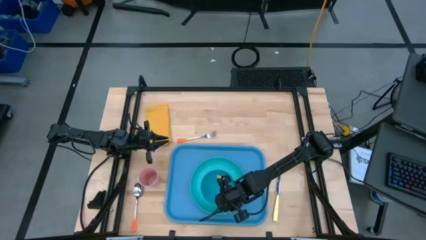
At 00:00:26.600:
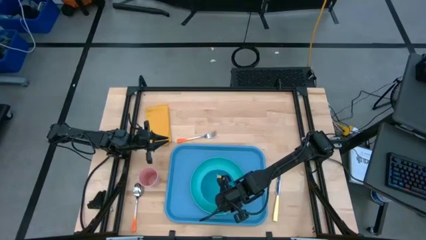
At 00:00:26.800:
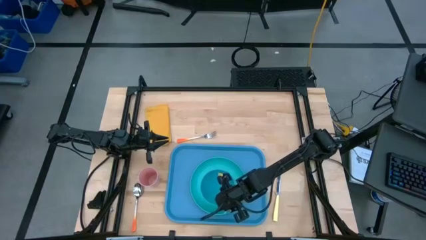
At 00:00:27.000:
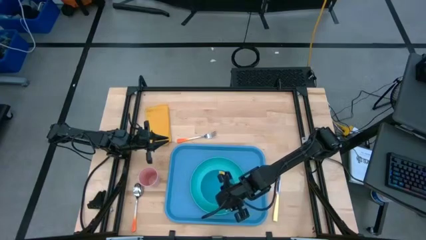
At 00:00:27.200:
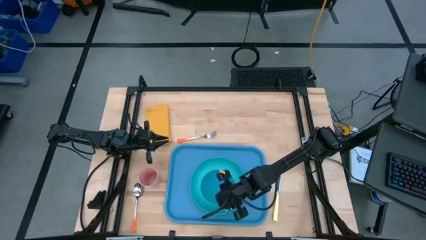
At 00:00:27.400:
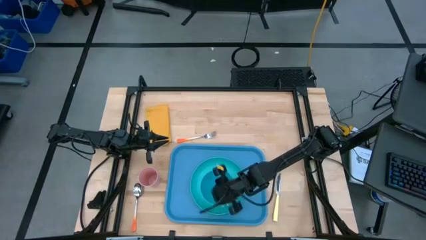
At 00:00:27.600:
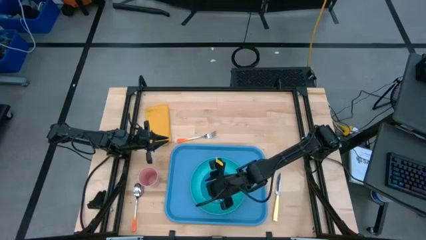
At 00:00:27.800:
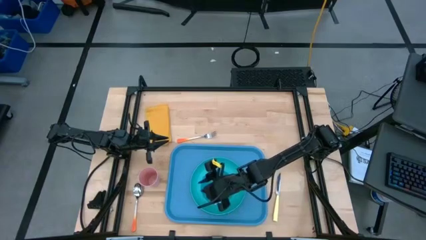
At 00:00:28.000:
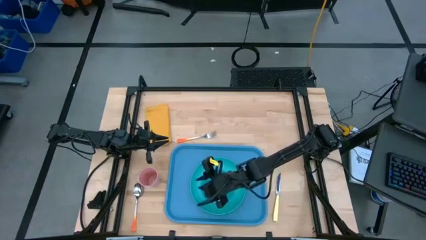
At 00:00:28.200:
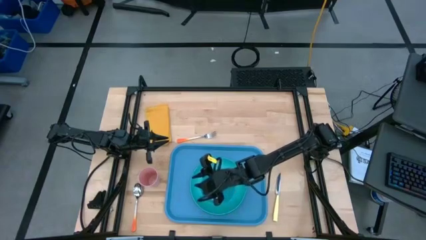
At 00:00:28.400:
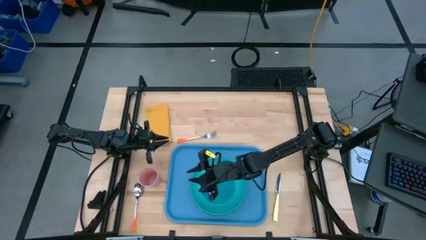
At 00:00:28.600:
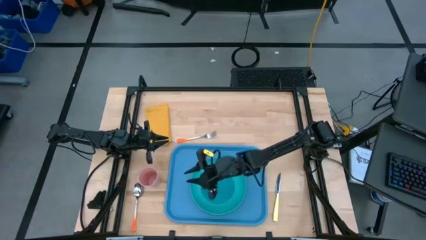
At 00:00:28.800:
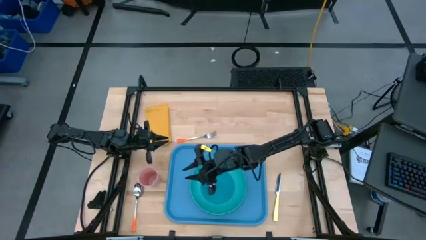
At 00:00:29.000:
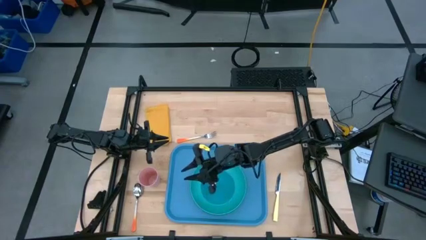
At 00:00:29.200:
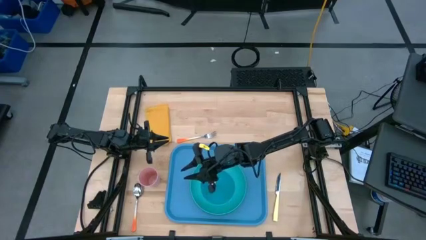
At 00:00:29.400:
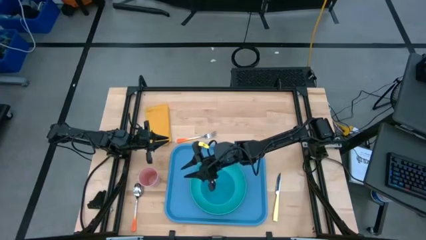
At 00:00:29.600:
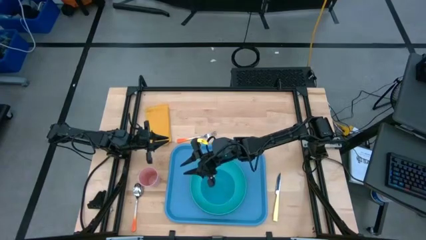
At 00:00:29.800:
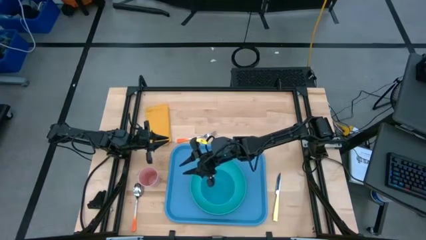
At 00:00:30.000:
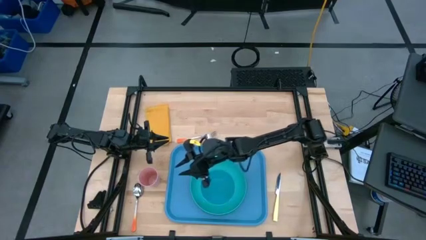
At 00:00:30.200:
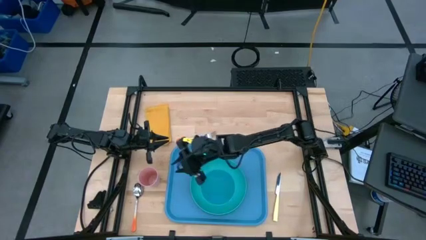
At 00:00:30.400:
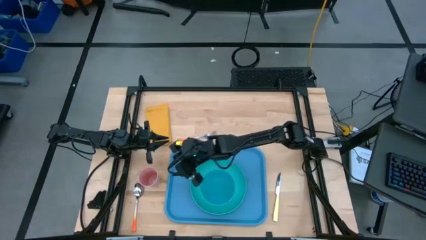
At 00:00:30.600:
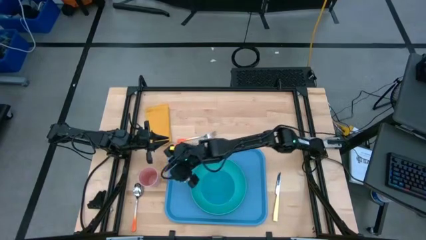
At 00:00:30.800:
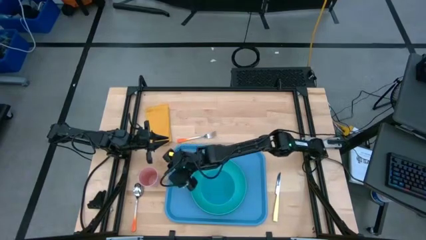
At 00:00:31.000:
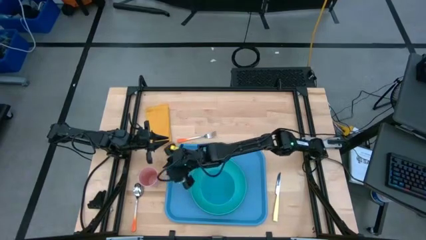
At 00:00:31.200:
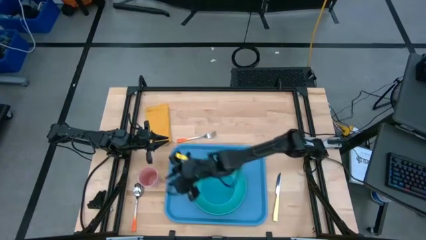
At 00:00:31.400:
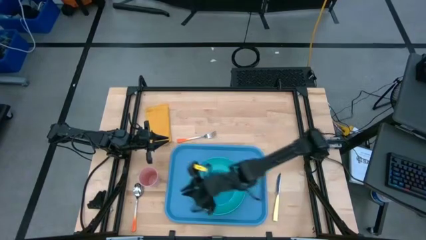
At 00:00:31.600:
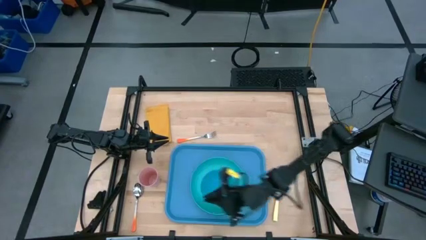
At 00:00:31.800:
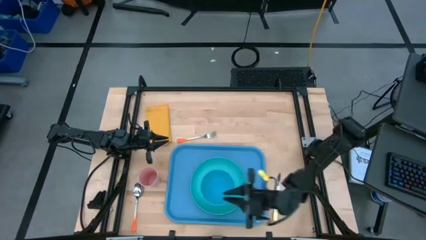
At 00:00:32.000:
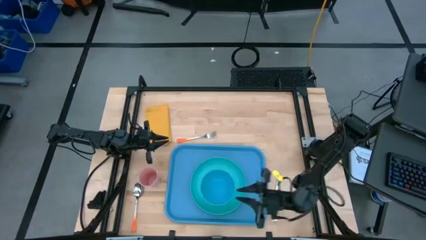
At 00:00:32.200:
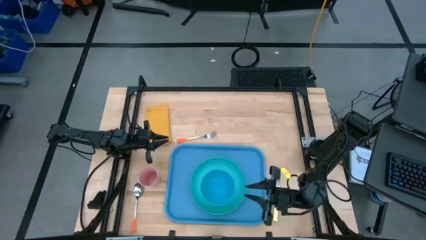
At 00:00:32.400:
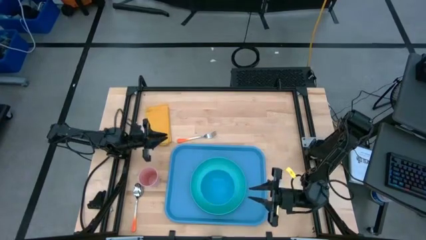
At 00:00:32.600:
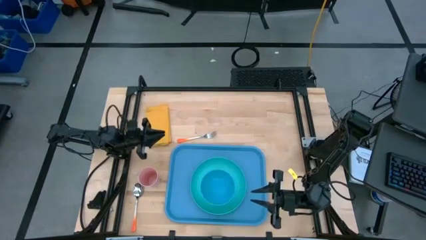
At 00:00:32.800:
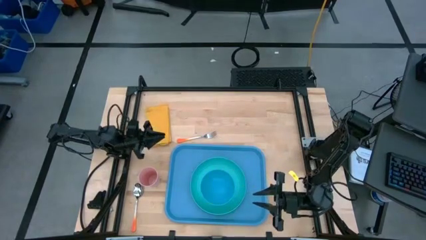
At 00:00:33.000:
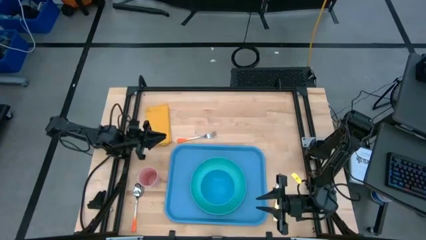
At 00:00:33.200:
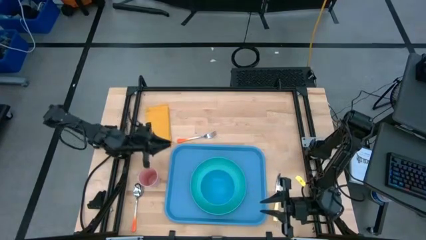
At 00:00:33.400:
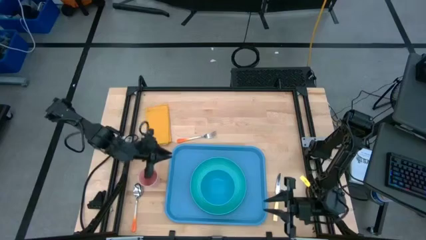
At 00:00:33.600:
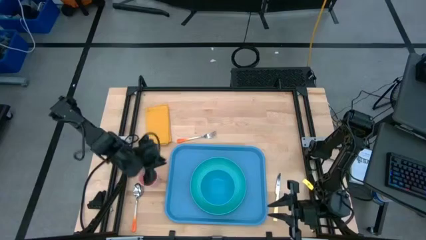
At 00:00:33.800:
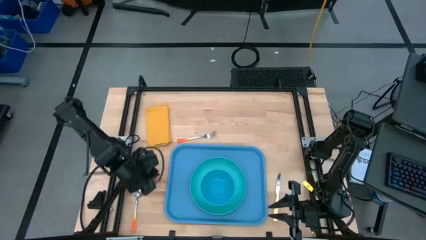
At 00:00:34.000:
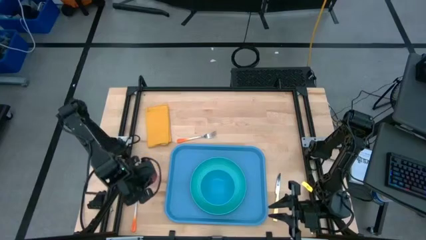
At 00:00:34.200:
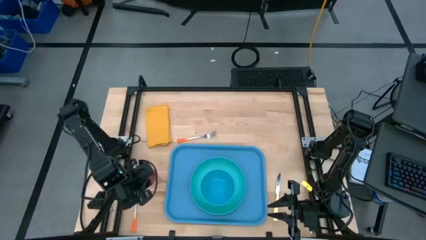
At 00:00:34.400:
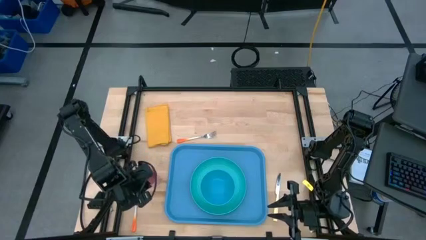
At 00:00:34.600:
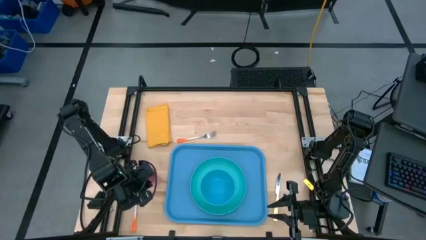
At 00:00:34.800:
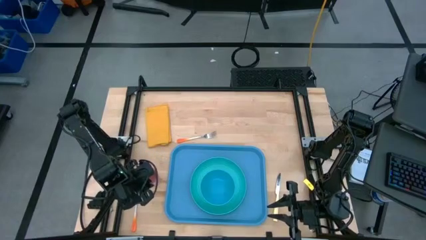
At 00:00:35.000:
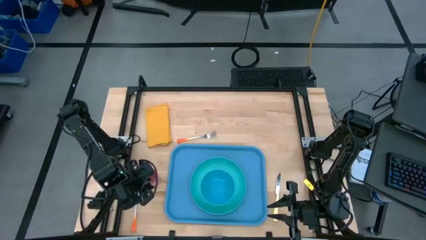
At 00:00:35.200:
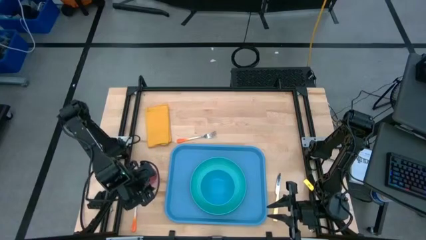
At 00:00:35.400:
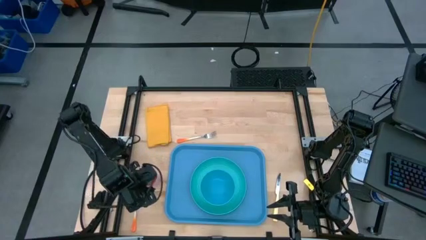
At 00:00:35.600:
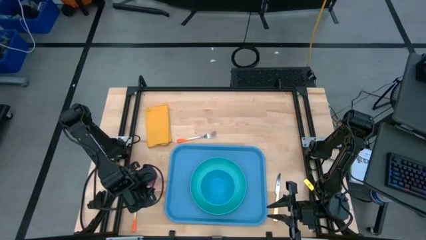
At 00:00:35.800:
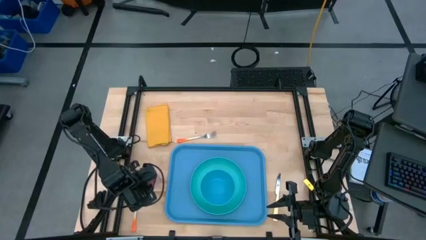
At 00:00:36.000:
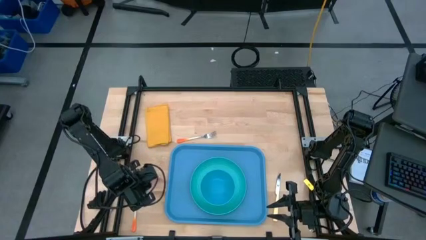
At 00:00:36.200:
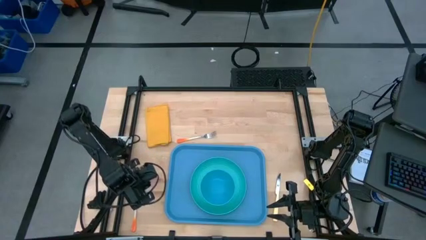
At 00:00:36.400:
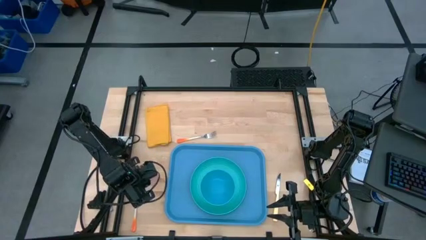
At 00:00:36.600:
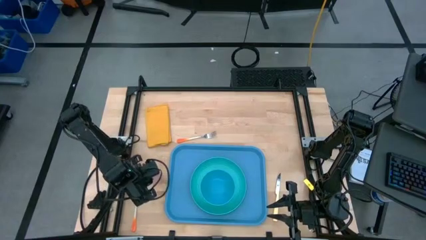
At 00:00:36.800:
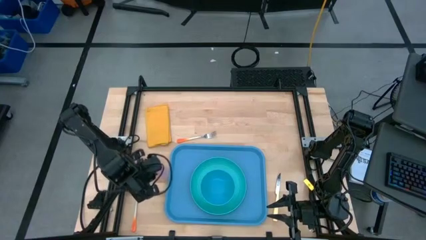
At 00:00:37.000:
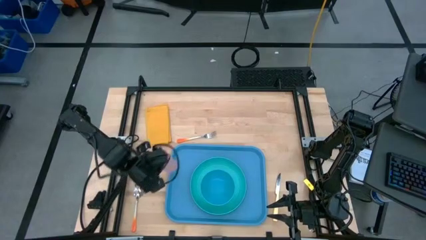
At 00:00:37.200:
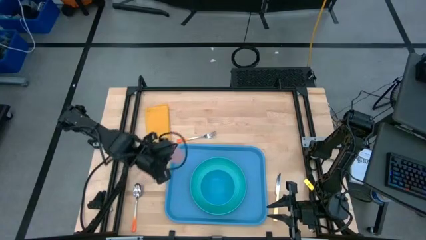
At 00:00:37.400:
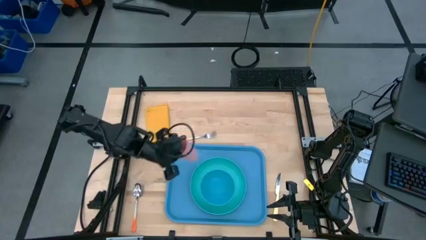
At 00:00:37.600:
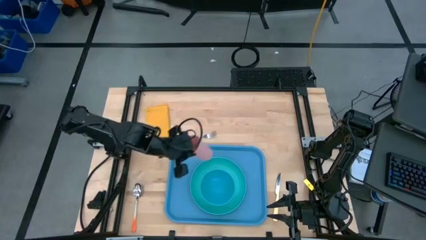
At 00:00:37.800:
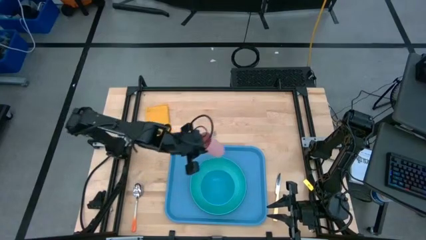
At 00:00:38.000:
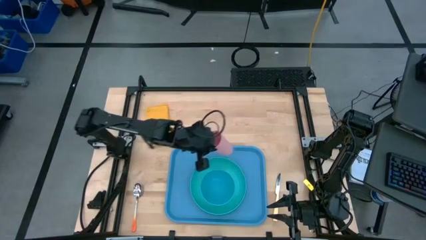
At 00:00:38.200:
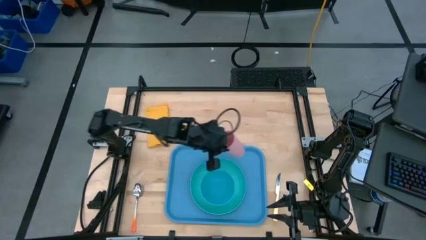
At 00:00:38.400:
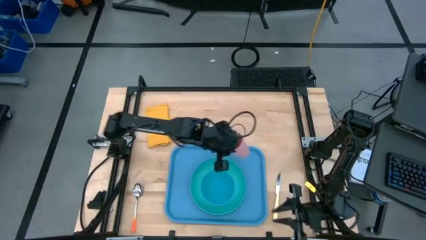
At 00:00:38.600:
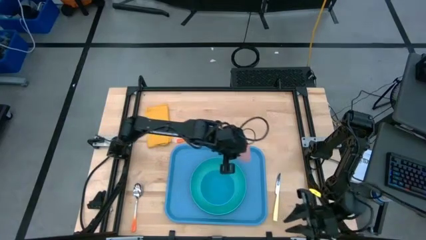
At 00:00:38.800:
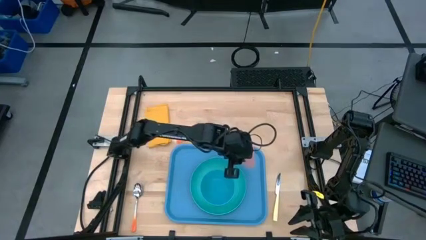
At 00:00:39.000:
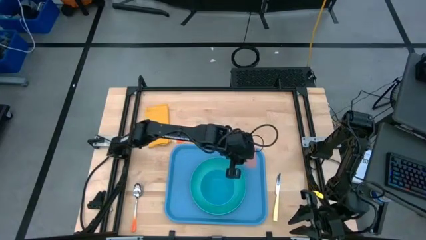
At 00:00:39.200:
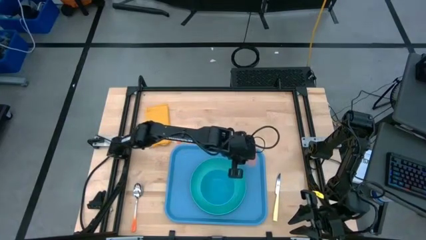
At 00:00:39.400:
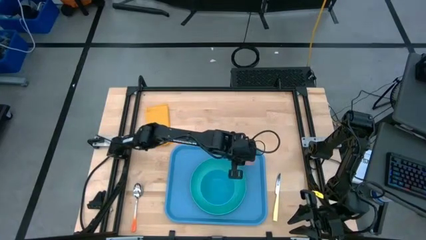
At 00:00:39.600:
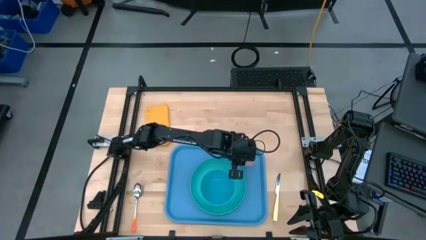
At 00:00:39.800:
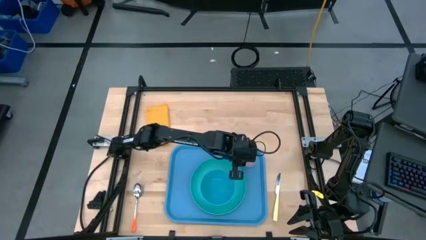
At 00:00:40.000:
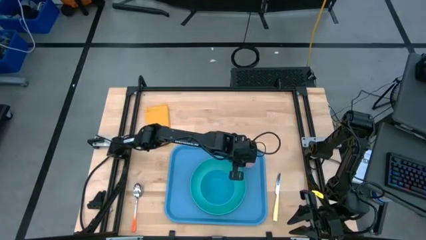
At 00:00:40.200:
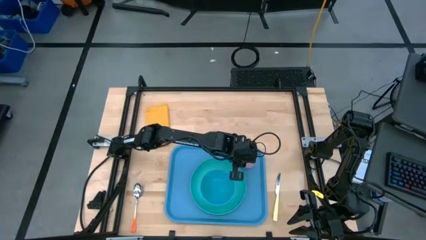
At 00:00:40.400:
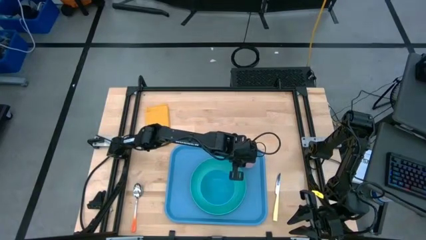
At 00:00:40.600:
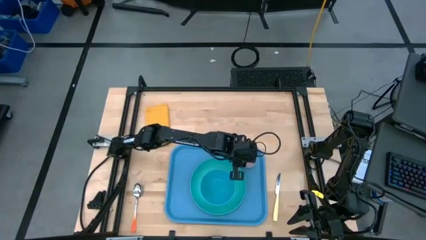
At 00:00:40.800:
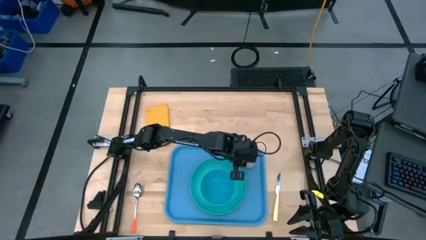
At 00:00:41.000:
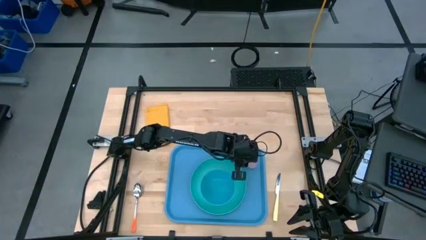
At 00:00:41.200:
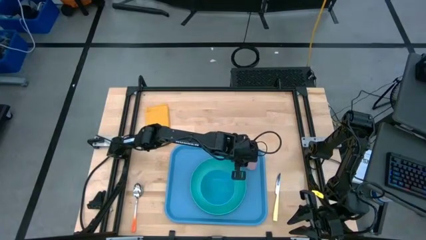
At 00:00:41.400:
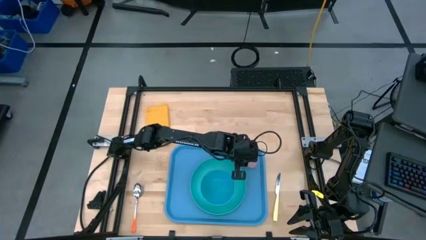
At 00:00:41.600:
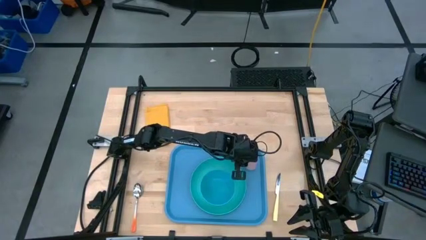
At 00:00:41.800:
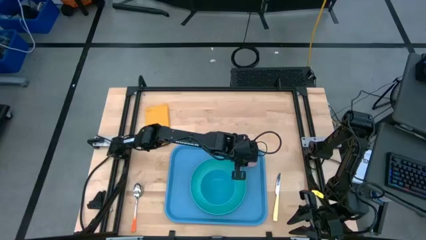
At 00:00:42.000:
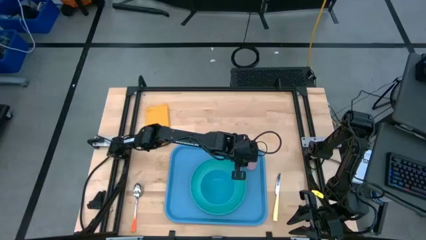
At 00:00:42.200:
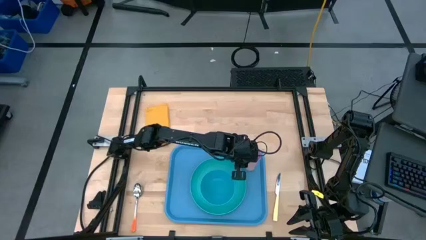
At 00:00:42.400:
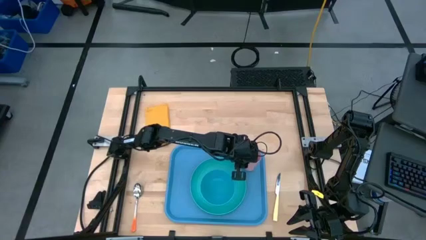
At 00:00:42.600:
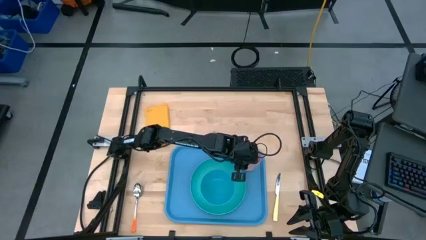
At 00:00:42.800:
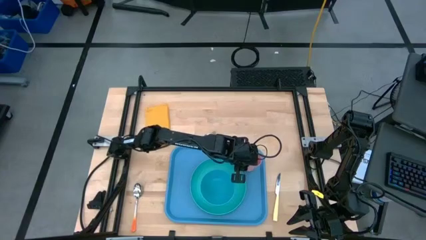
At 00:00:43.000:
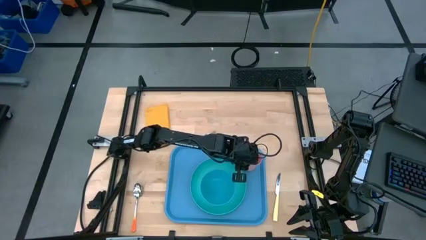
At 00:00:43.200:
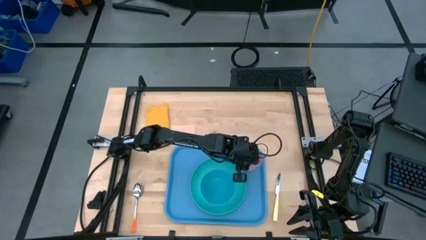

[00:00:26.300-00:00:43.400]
Task: Set up tray
Put the pink cup on the blue serving tray to the top right of the light blue plate
